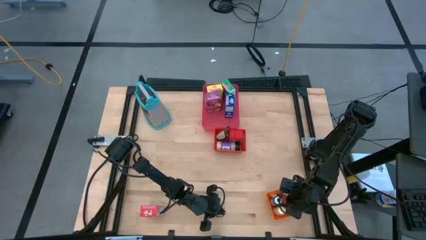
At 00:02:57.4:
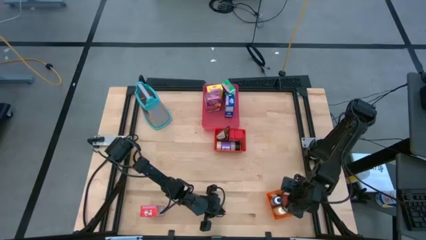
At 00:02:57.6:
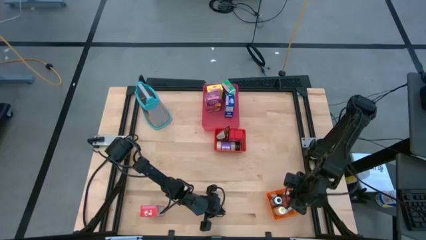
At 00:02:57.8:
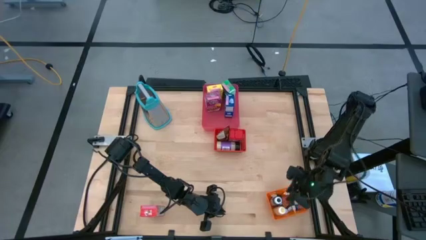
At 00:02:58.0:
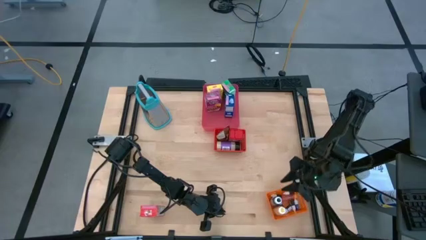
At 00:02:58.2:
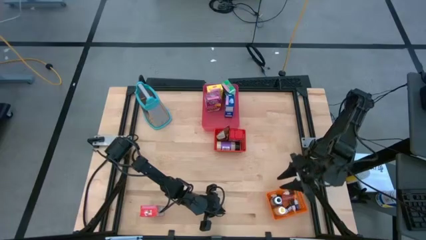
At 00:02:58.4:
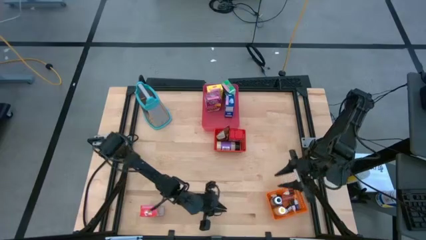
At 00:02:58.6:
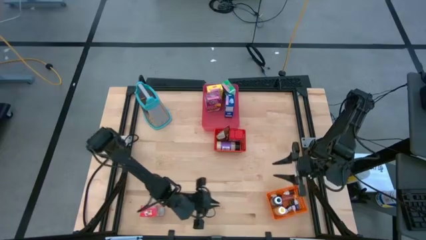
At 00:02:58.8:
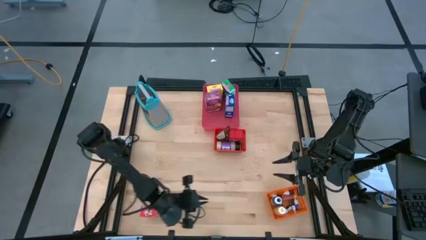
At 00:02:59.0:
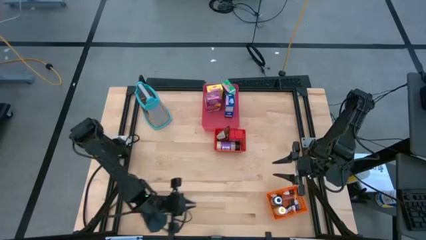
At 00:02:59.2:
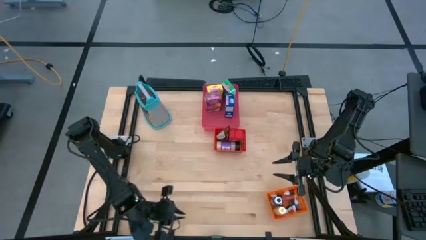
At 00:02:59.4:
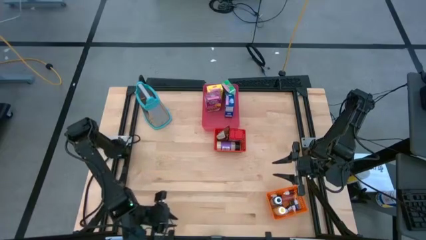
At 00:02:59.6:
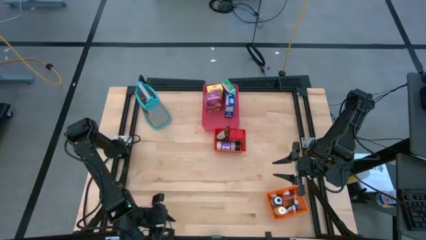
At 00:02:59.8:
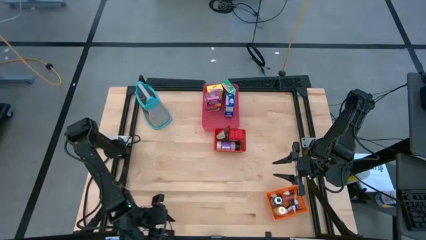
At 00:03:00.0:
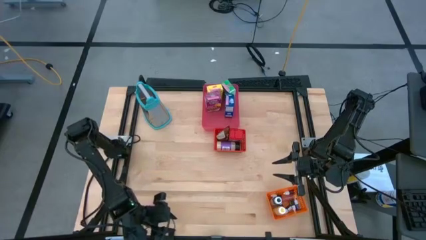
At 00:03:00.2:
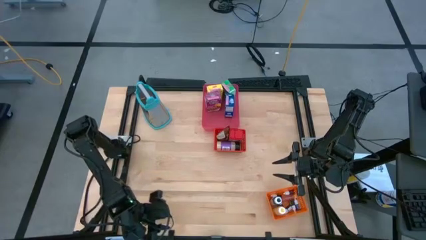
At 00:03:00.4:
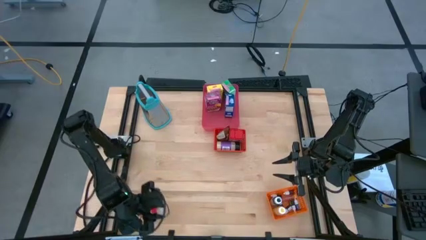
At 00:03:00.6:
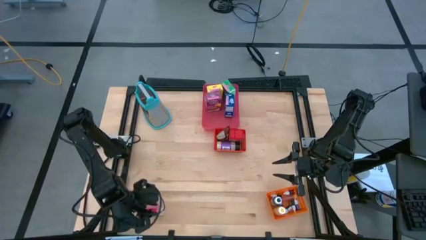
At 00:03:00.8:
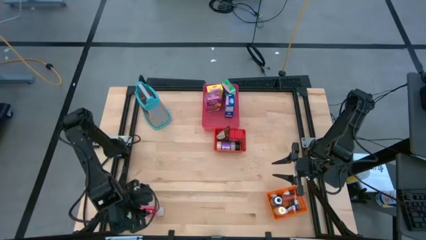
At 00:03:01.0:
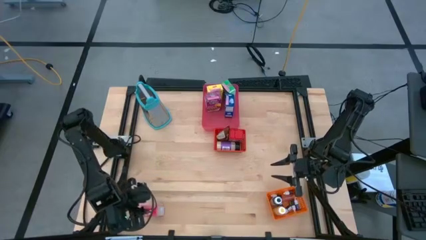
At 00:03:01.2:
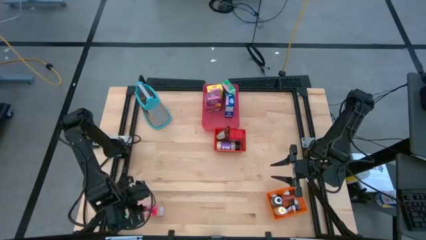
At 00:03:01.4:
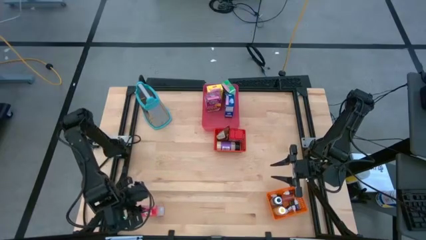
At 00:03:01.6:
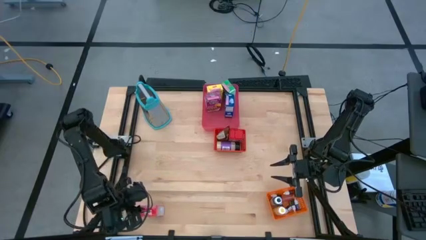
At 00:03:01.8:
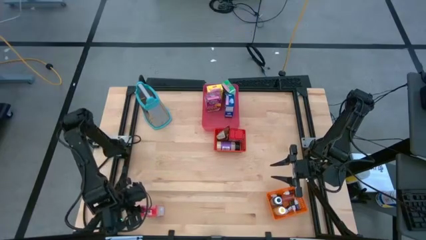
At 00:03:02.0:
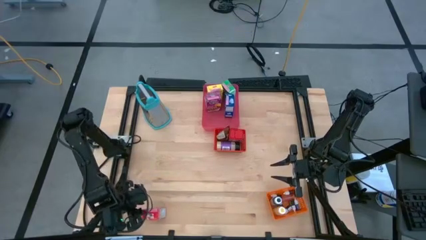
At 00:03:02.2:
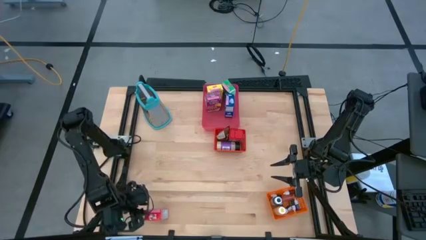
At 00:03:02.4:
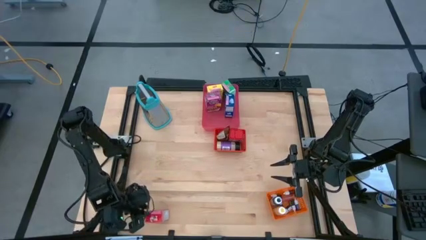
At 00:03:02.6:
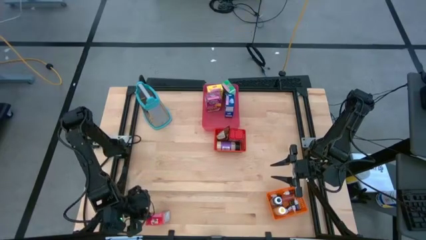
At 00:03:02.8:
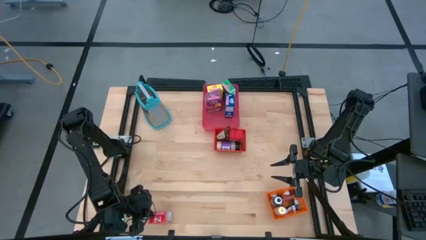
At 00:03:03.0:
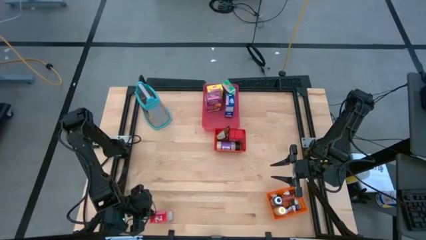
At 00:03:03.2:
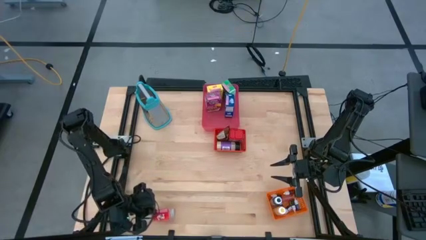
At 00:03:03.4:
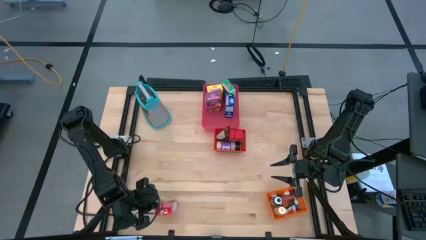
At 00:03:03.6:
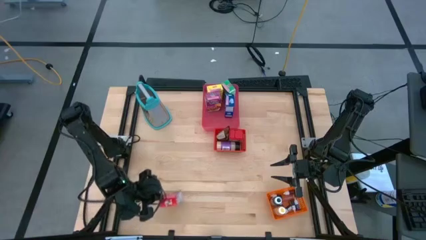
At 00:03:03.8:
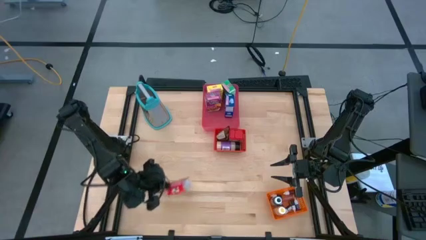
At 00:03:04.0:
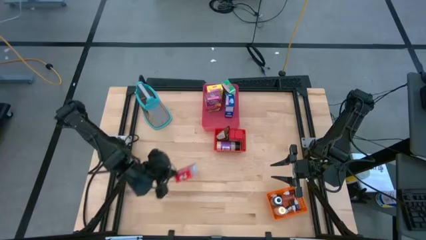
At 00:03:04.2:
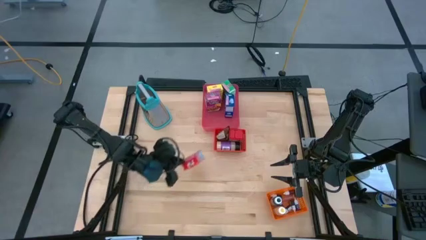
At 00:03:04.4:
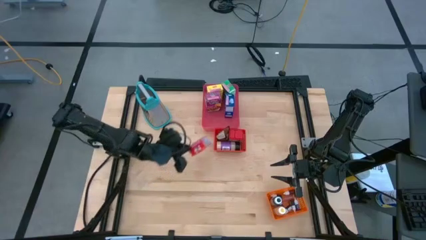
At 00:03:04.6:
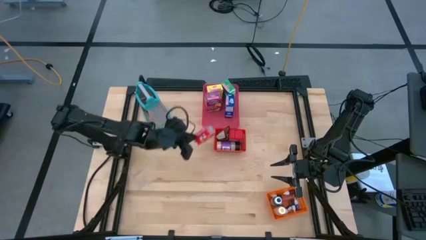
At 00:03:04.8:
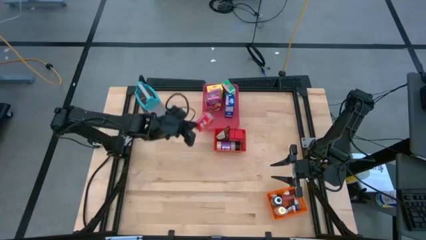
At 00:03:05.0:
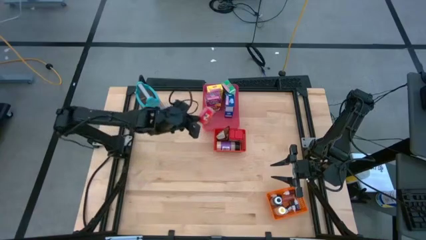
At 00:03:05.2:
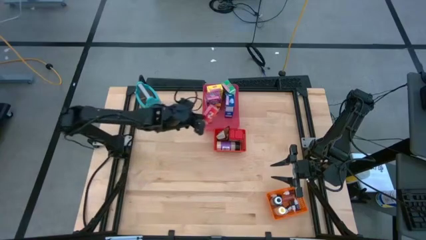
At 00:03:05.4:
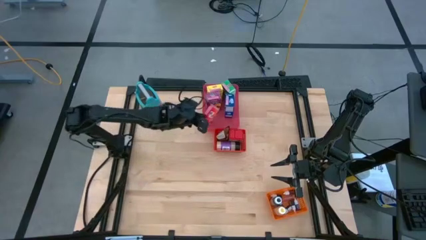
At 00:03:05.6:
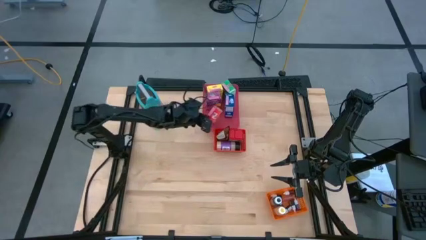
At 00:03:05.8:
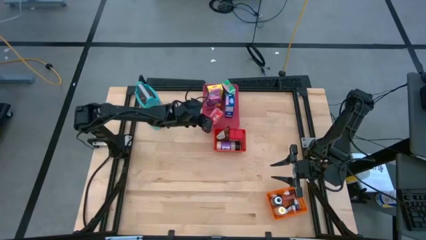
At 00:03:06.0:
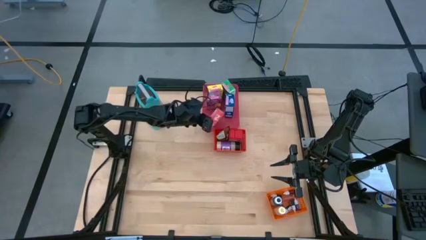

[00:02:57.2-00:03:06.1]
Task: Pick & Place Kitchen Items
Put the red cereal box into the pink bin

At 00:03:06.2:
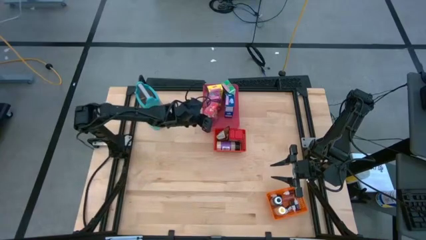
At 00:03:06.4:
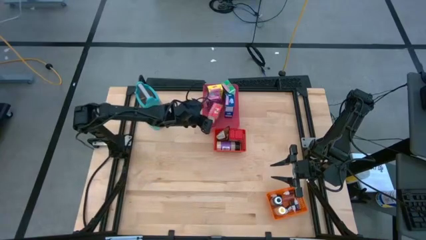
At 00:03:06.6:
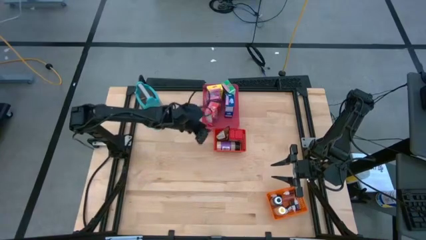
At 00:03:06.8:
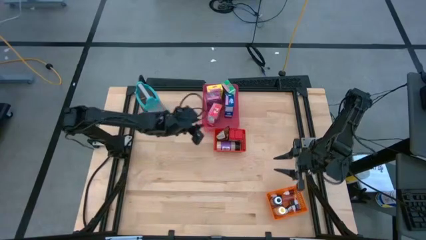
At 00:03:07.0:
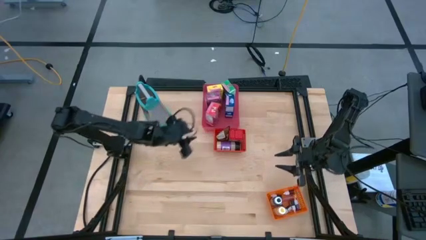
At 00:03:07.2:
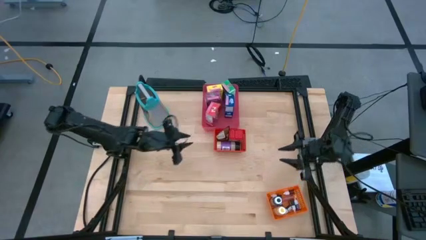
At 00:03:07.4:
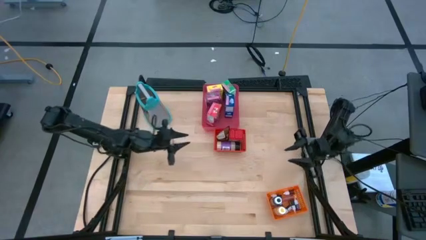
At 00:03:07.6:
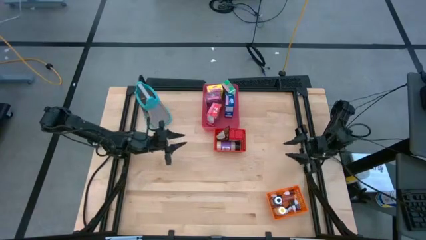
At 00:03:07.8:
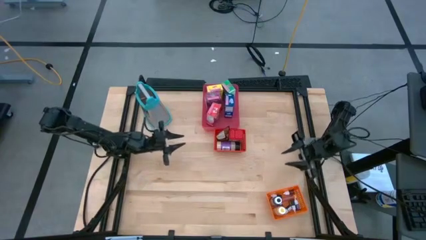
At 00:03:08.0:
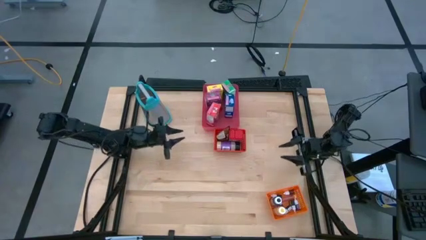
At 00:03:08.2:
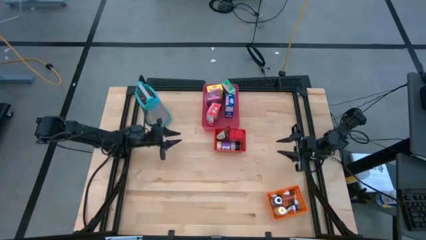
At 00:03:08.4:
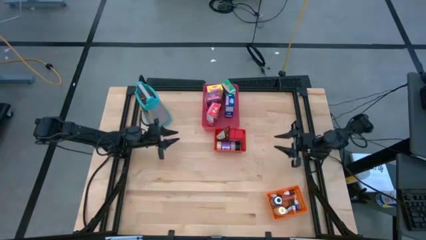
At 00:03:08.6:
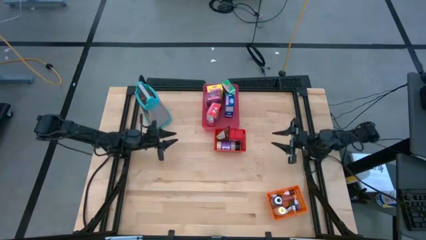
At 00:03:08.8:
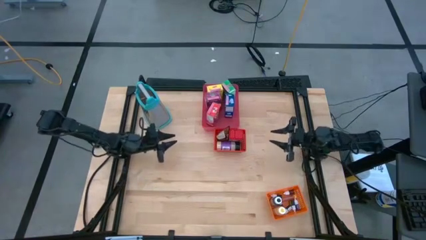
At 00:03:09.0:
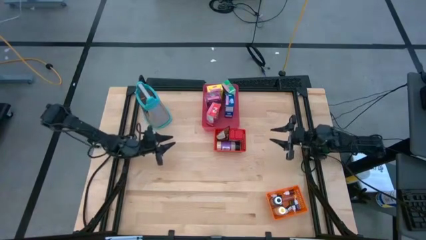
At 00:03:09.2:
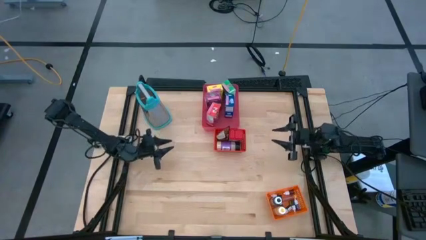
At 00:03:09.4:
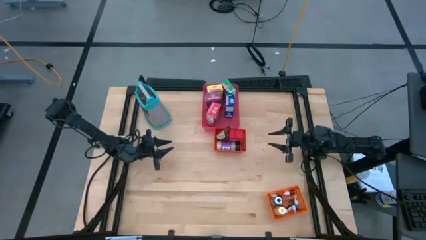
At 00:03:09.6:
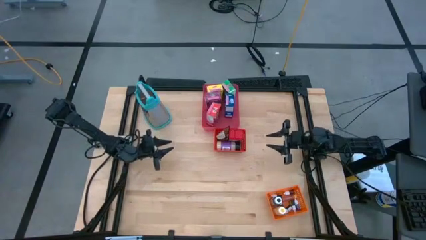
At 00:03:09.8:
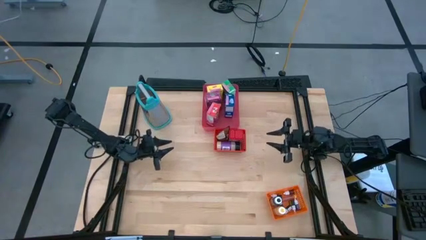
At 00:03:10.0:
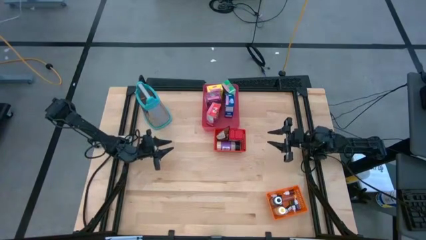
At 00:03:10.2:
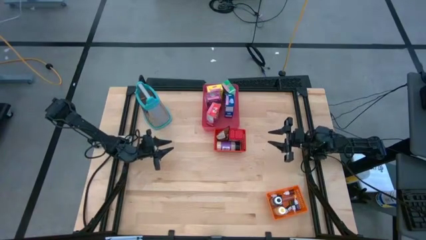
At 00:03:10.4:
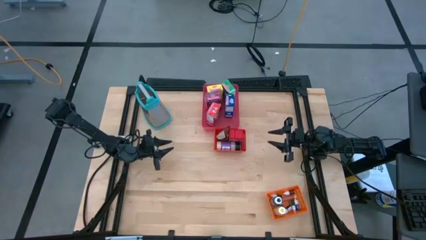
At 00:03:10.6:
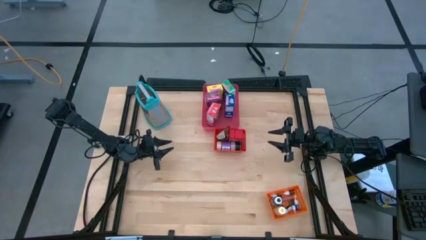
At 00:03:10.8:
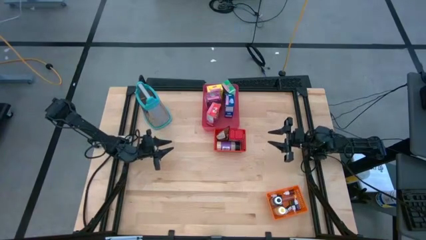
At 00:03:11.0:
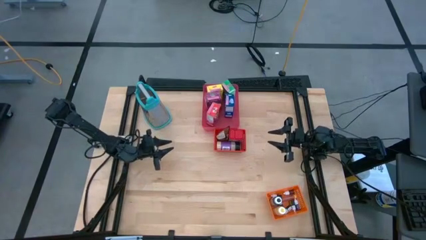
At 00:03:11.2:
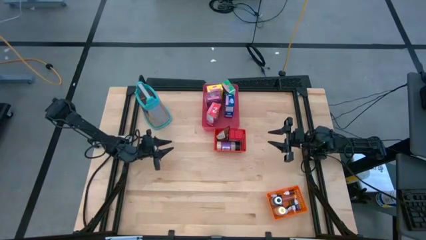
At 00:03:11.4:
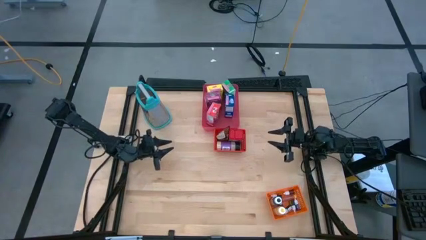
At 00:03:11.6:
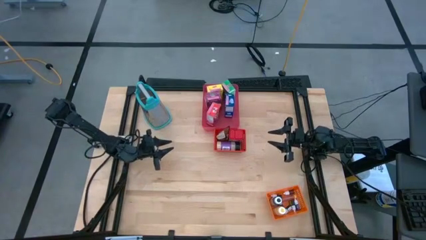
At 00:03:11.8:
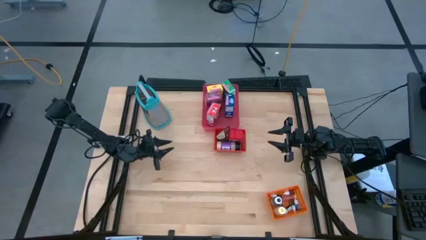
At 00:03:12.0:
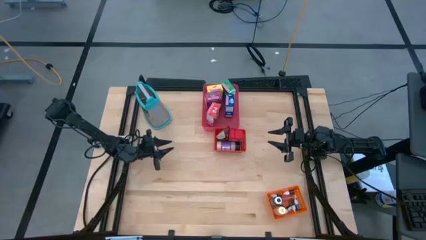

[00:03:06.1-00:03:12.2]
Return to Home Position
